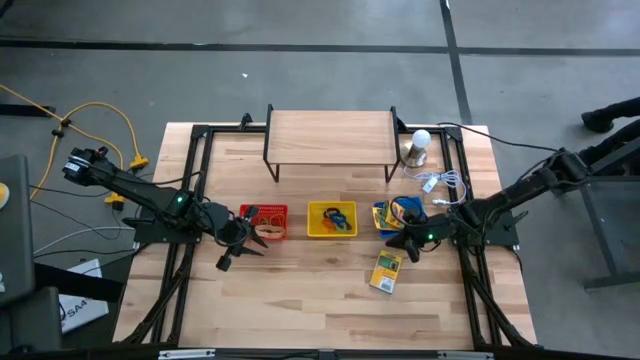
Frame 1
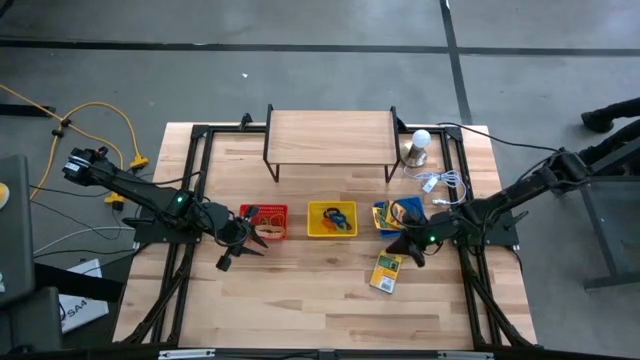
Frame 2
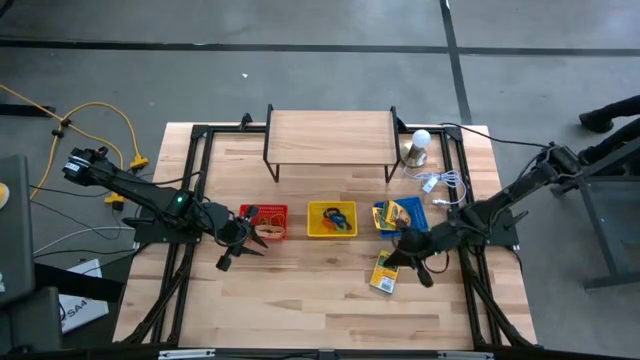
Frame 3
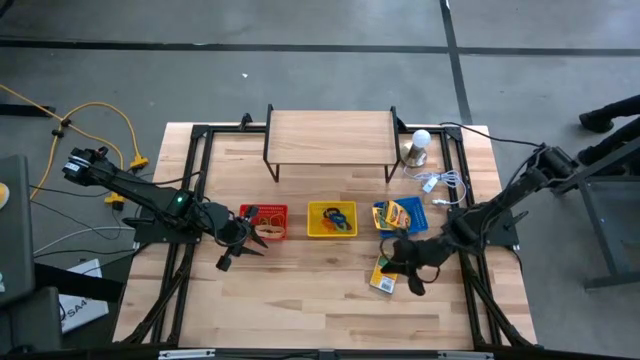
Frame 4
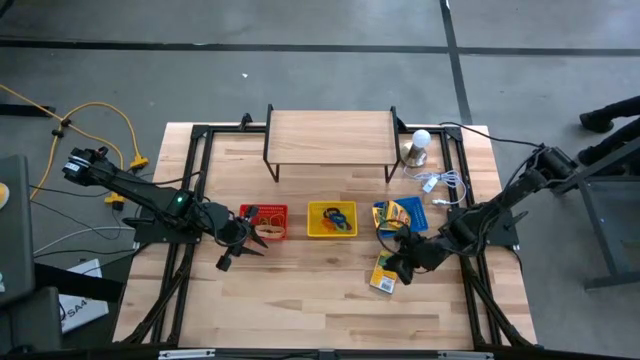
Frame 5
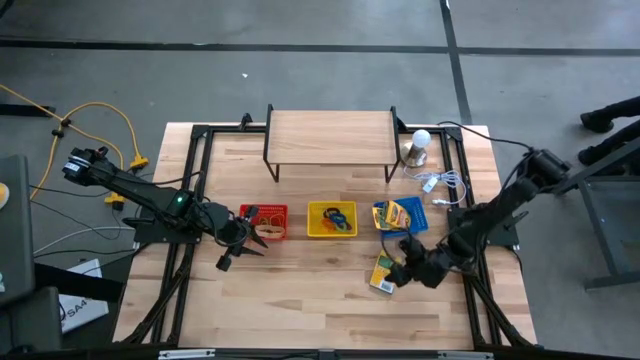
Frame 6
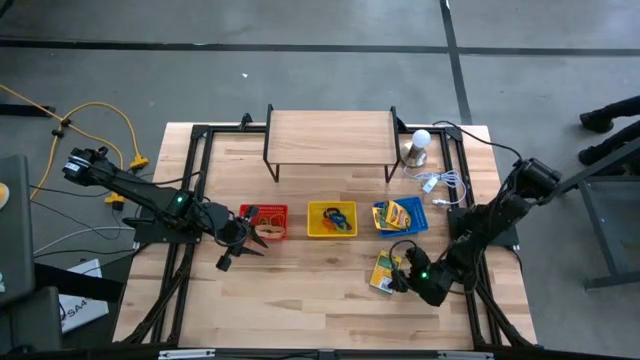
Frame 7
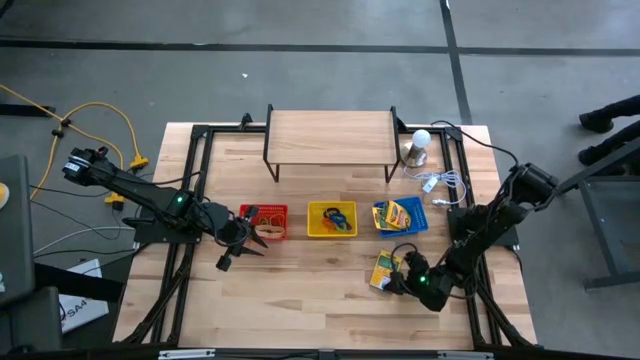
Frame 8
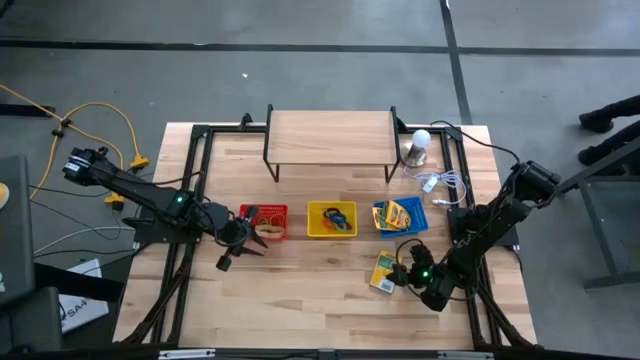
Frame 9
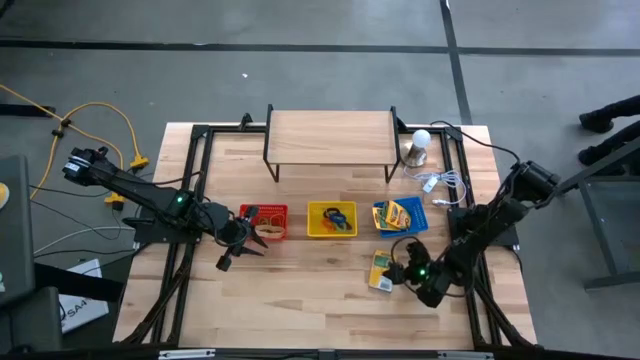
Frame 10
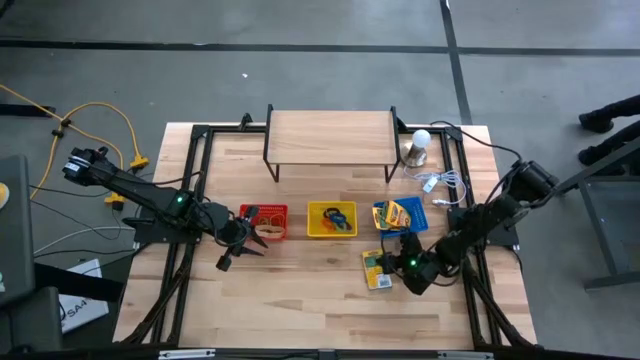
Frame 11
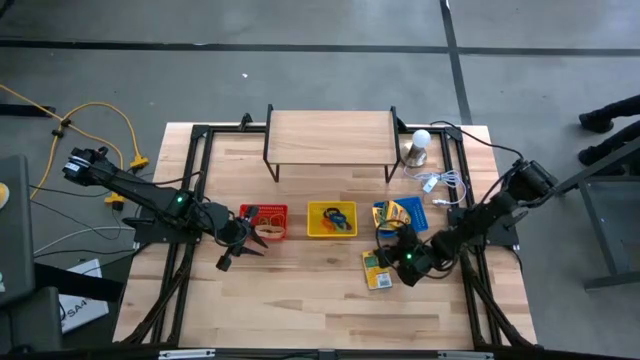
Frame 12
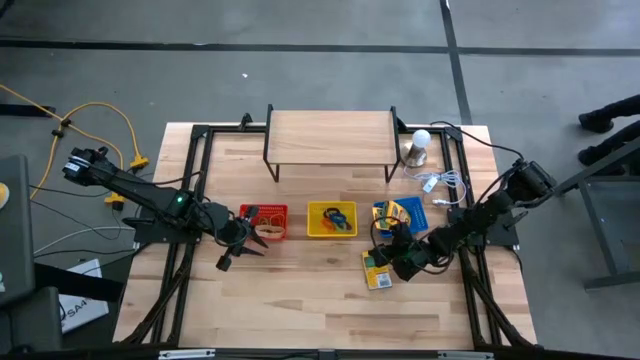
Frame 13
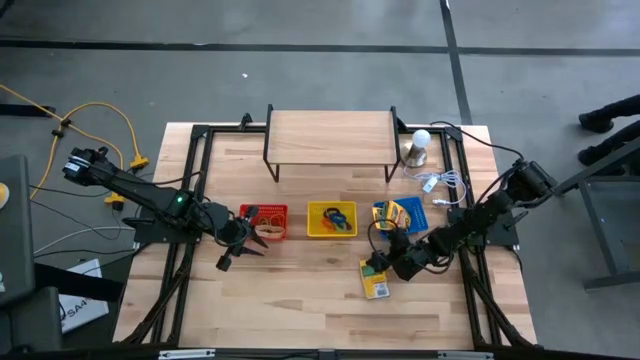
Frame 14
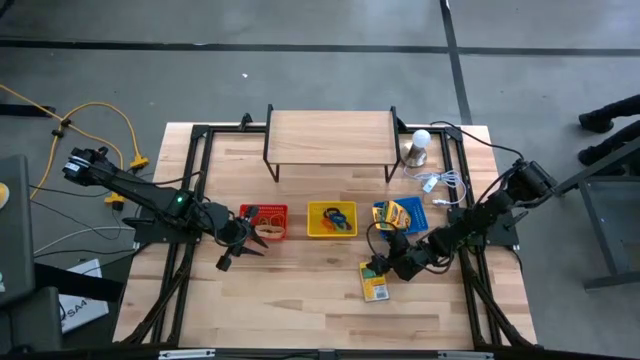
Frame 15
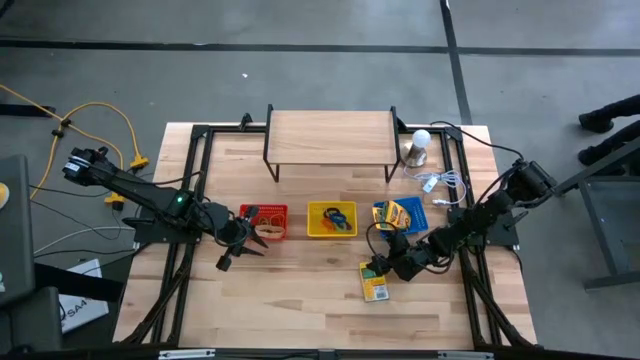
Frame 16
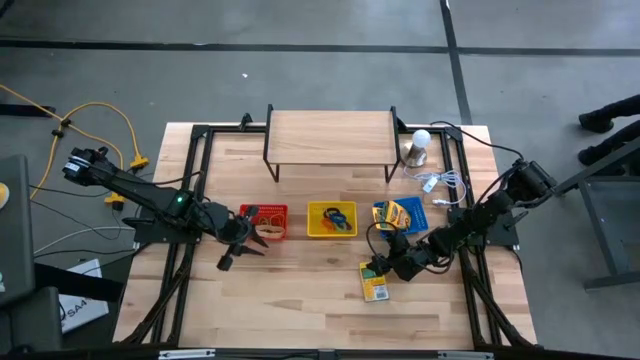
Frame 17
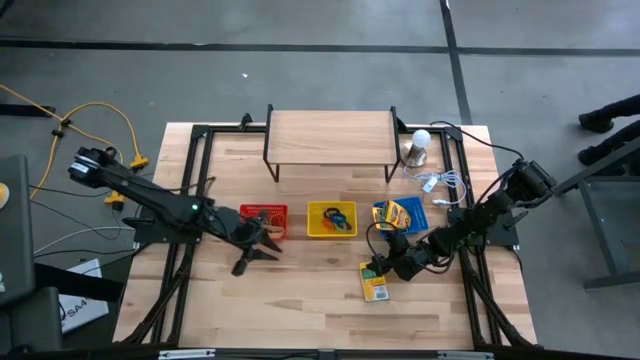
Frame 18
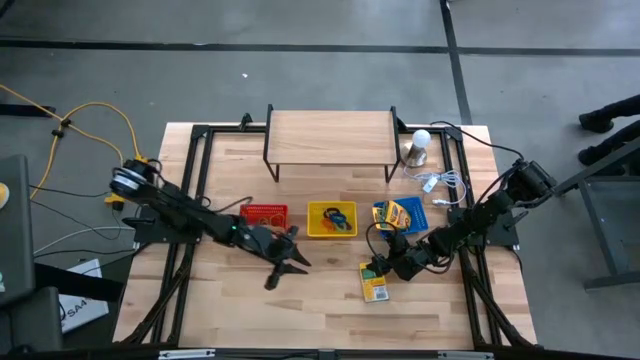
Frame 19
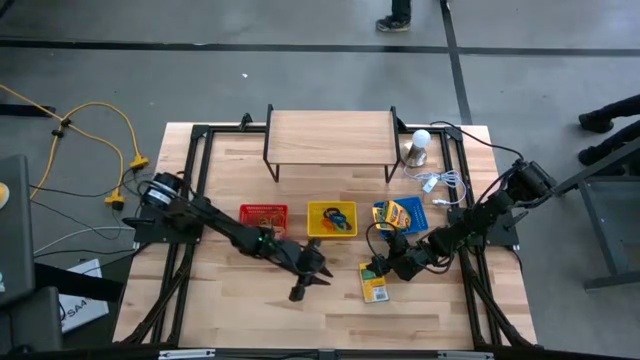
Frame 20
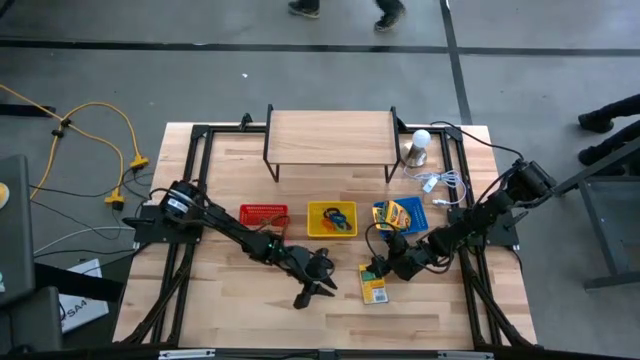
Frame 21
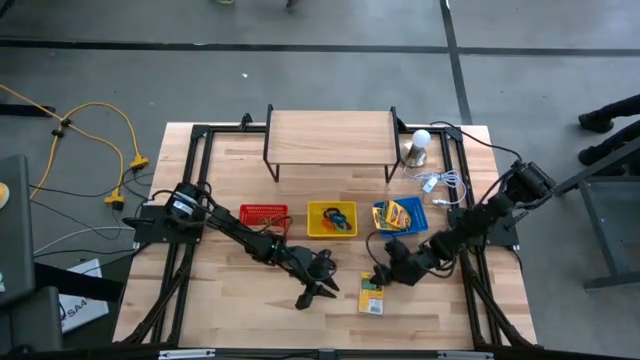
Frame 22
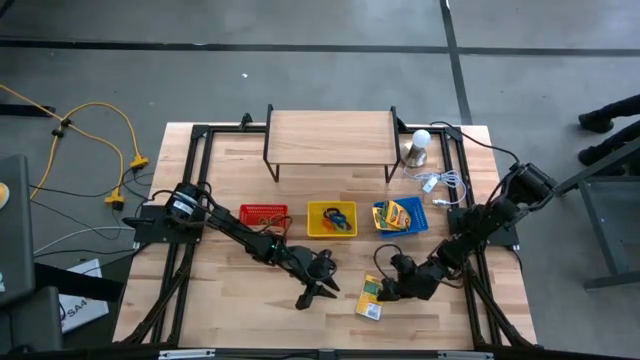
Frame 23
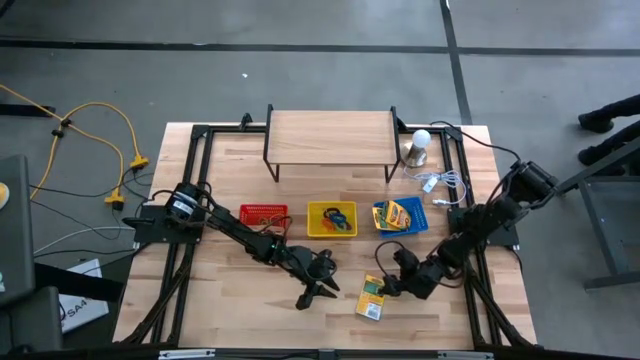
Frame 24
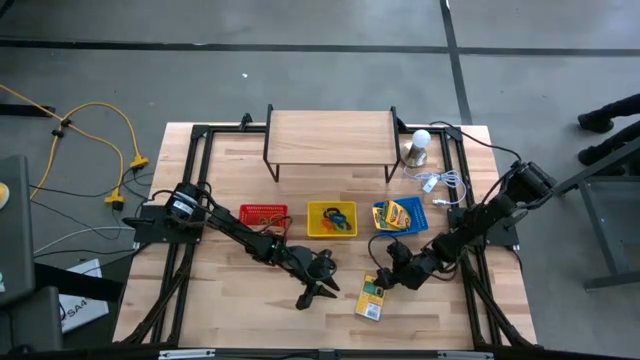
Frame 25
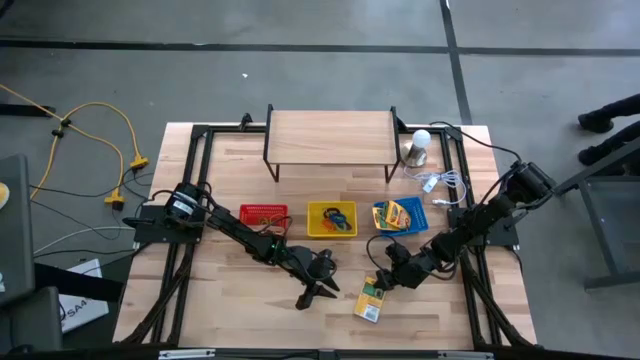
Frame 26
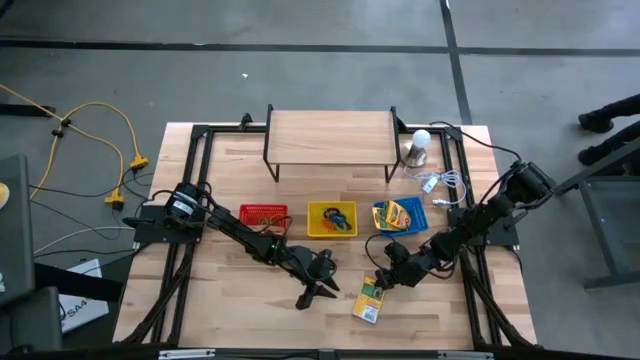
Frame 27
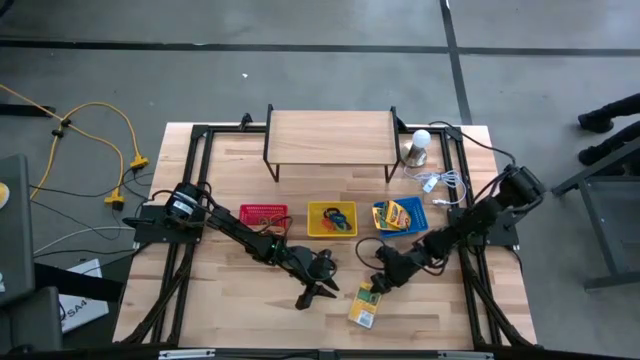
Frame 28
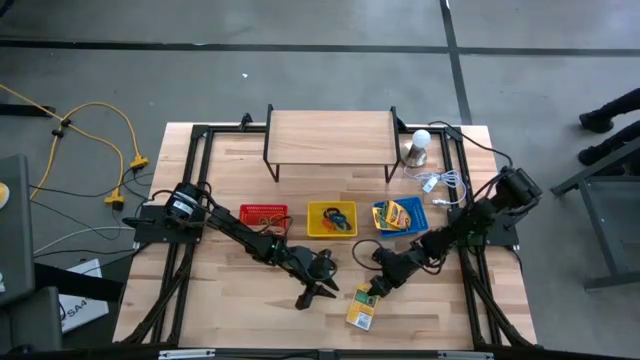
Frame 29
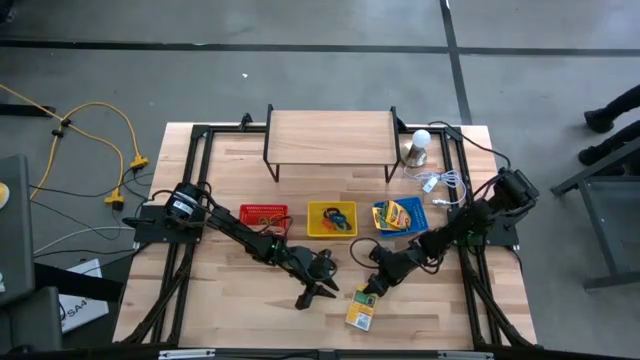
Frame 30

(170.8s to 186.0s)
Task: Pick & Place Office Desk Supplies
Put the box of crayons into the blue bin

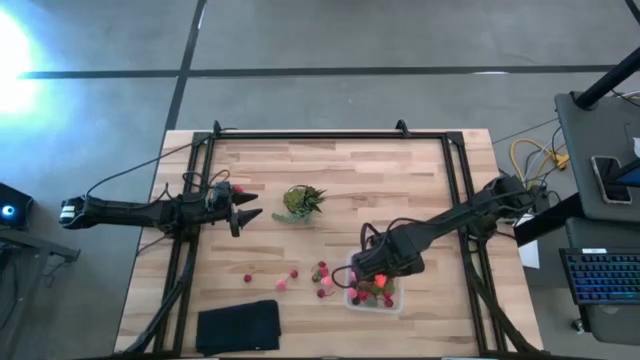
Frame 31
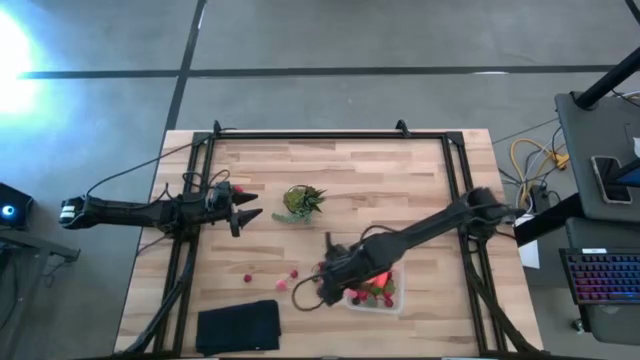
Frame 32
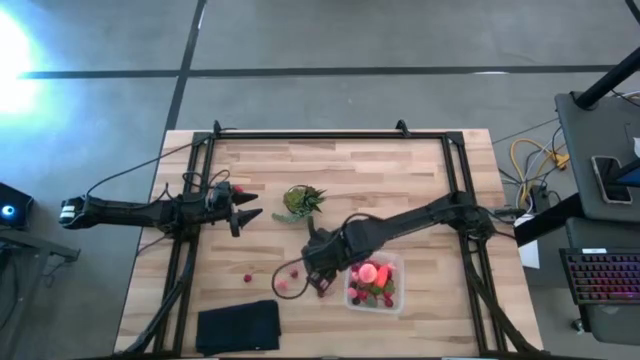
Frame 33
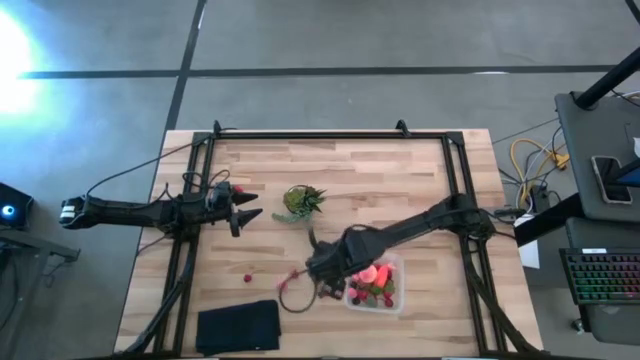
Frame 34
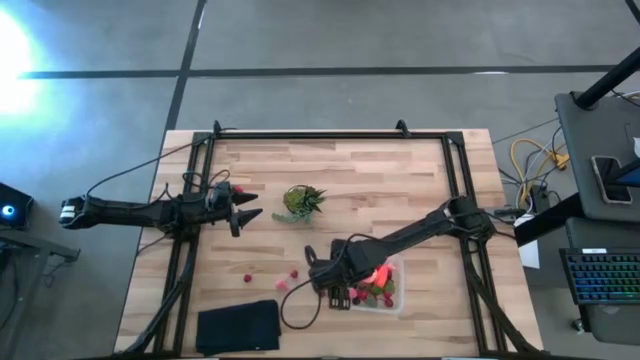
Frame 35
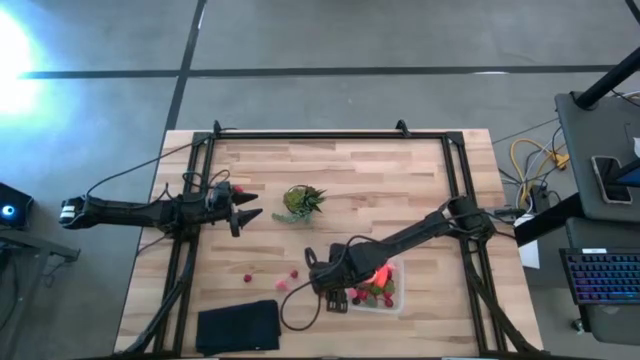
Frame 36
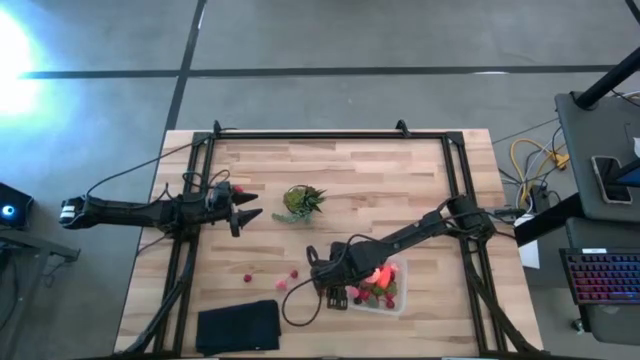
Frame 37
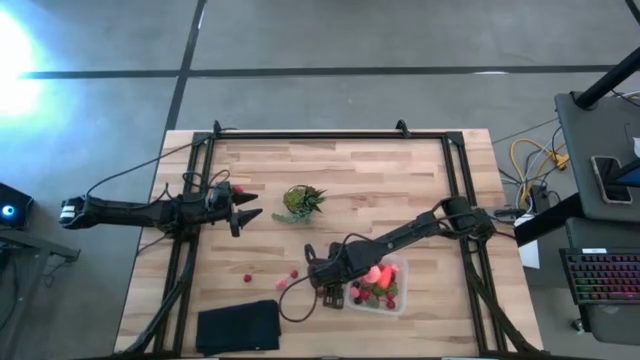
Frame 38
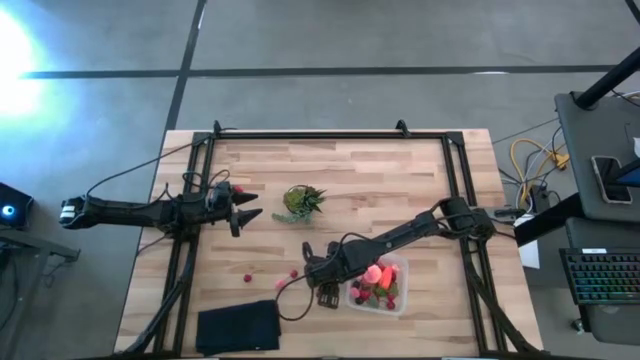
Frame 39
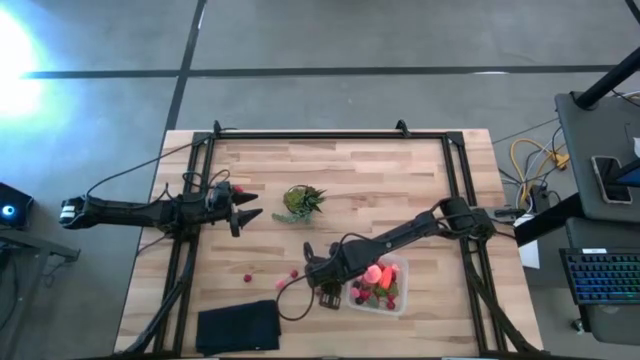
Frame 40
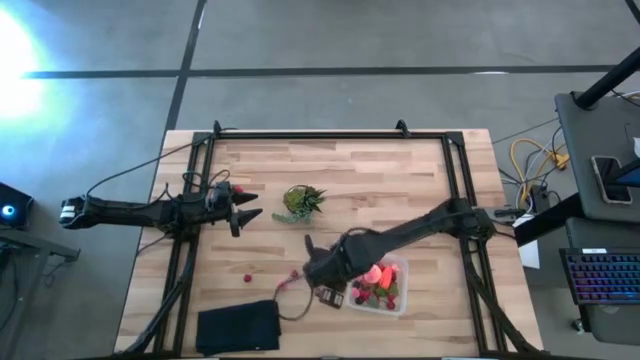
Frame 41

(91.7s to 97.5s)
Task: Pick and placing Produce into tupperware
Put the right apricot into the bin

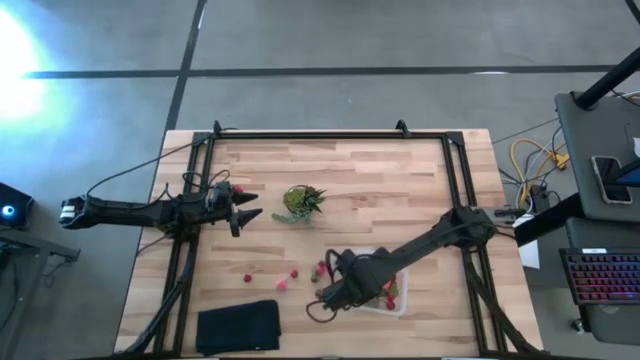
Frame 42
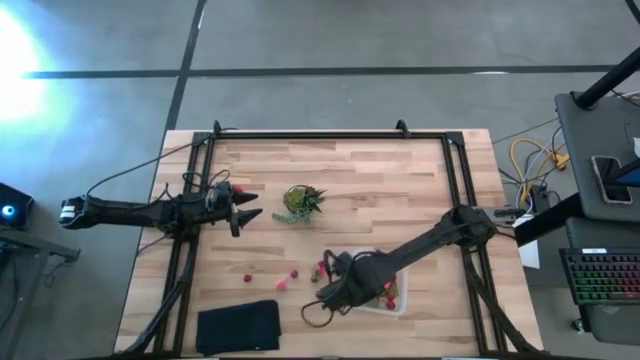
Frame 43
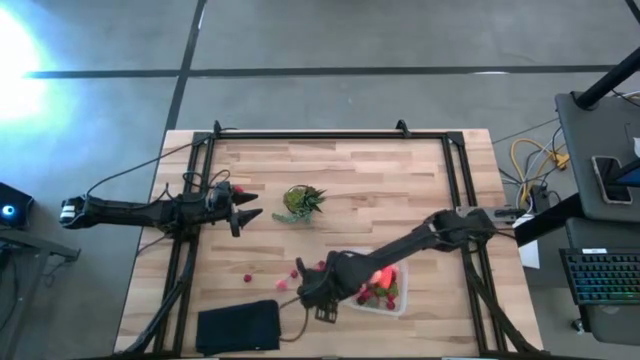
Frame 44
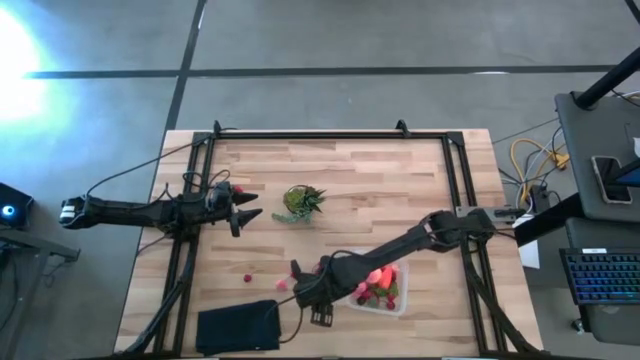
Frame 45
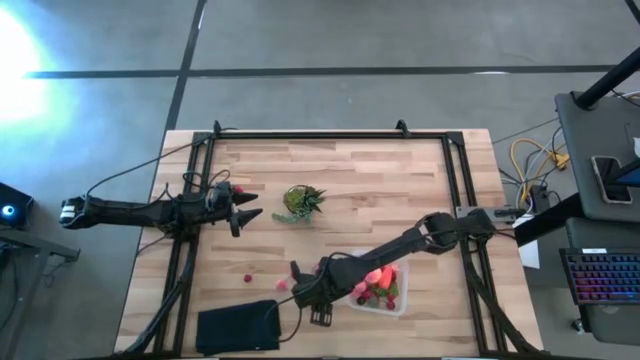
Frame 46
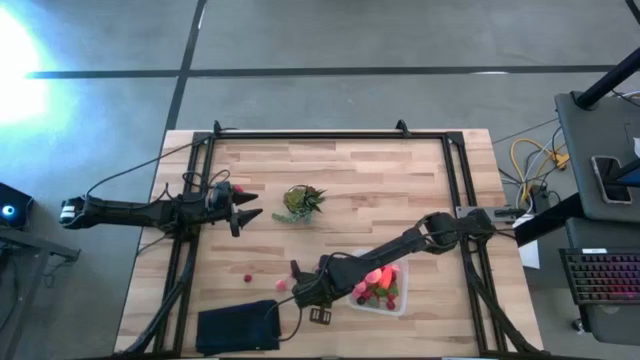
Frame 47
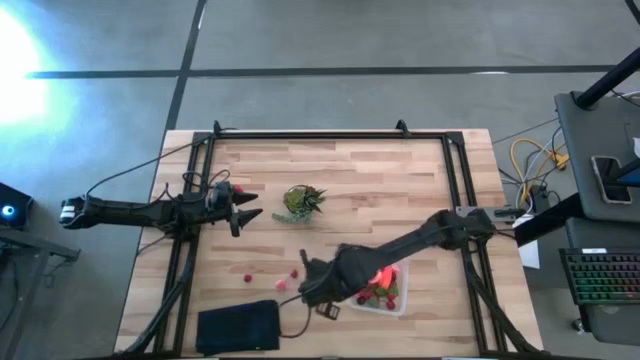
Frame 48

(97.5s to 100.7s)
Put the cherry into the bin
